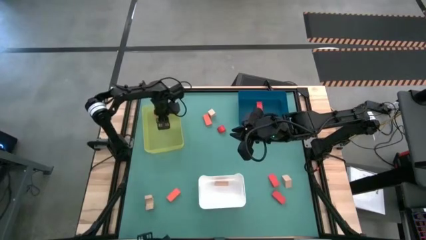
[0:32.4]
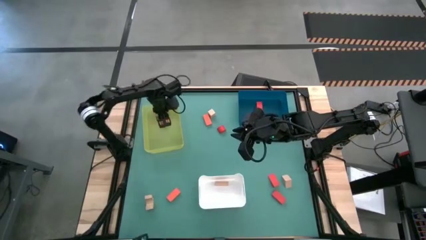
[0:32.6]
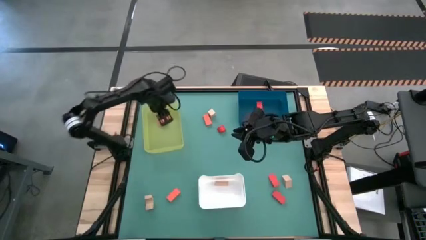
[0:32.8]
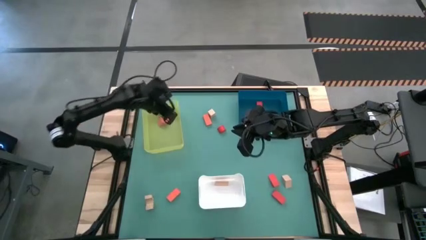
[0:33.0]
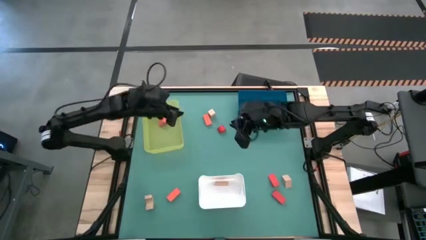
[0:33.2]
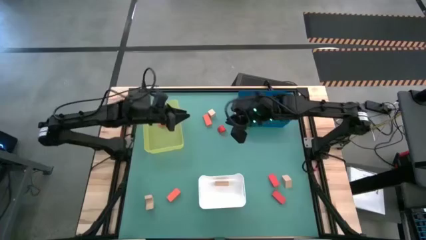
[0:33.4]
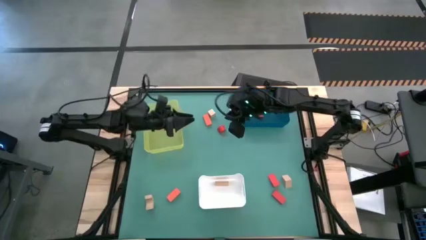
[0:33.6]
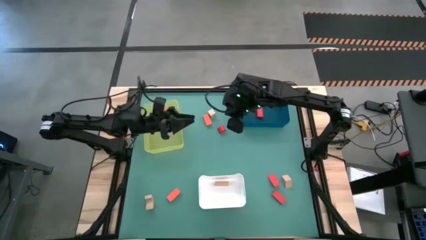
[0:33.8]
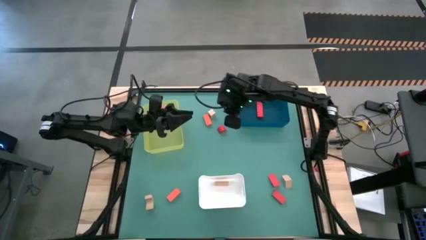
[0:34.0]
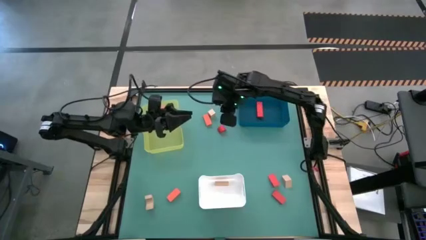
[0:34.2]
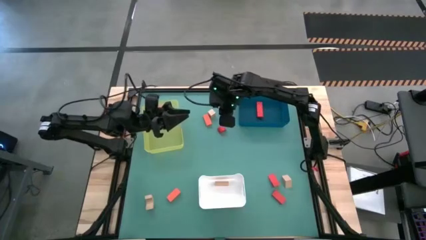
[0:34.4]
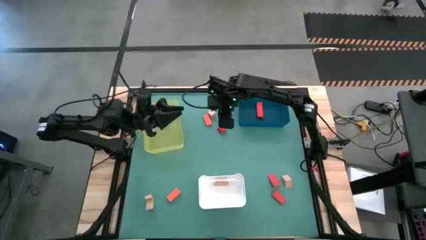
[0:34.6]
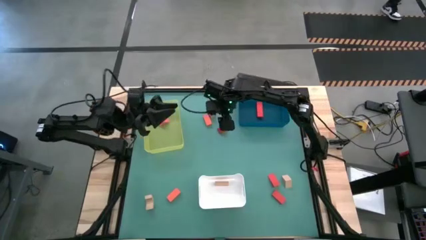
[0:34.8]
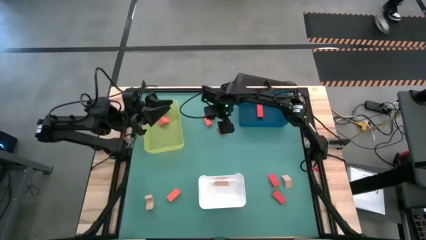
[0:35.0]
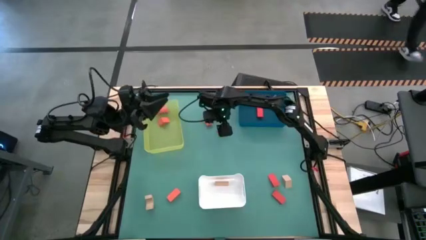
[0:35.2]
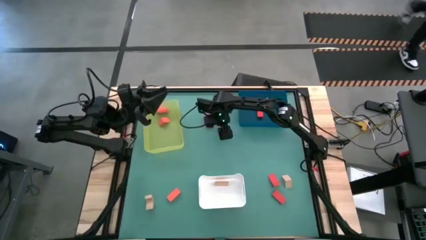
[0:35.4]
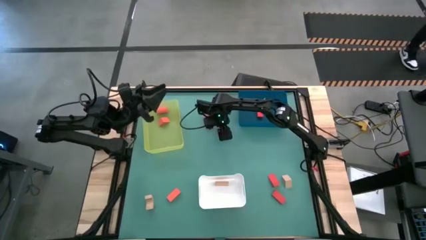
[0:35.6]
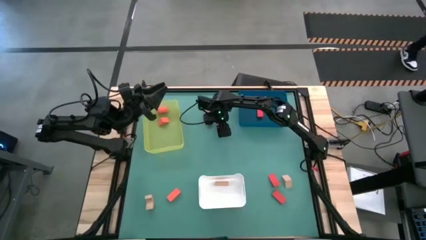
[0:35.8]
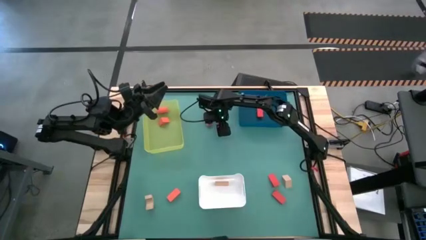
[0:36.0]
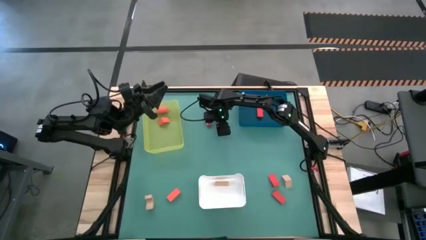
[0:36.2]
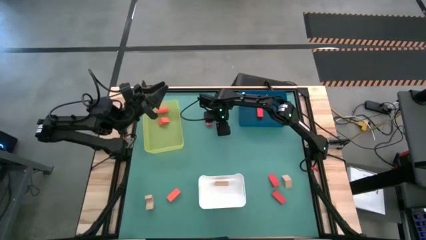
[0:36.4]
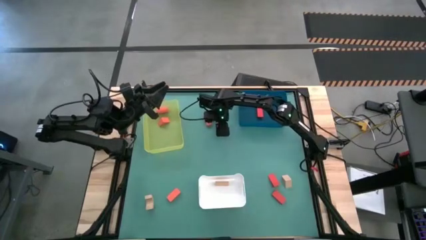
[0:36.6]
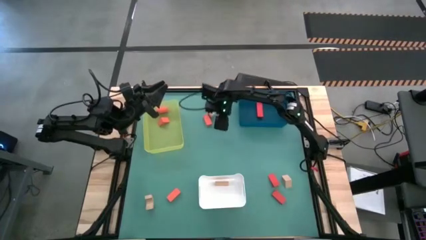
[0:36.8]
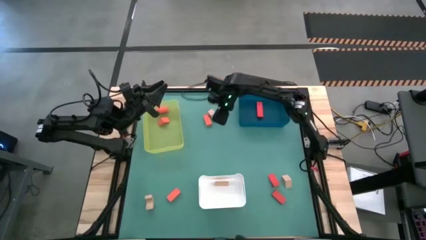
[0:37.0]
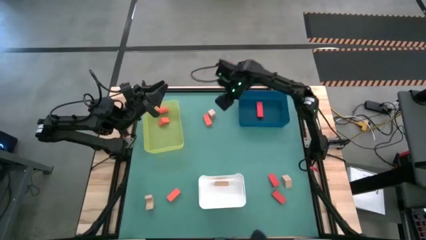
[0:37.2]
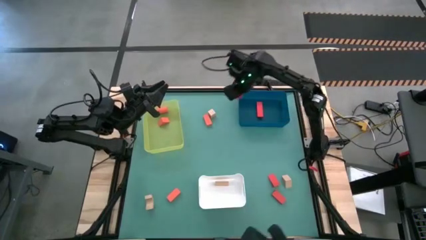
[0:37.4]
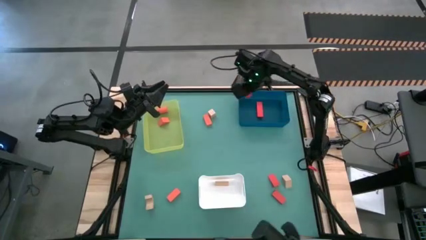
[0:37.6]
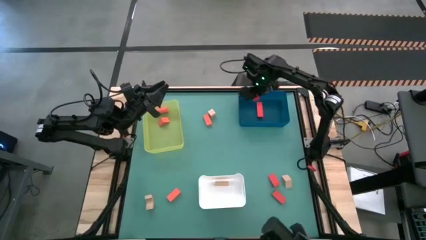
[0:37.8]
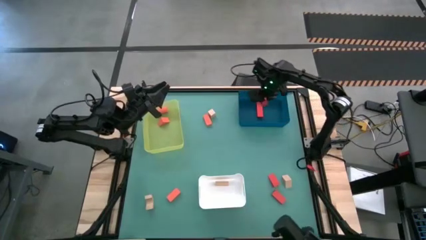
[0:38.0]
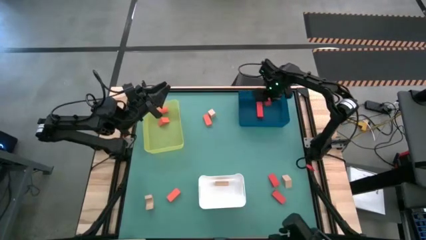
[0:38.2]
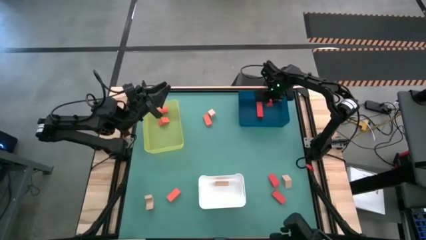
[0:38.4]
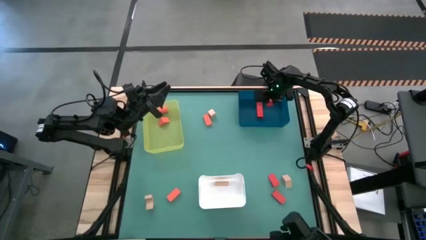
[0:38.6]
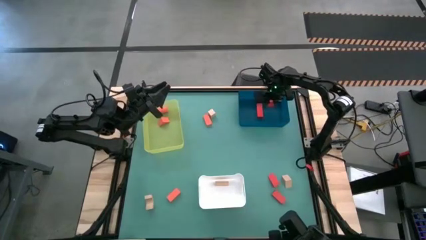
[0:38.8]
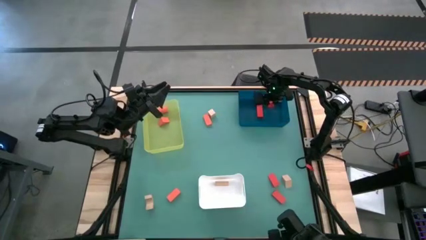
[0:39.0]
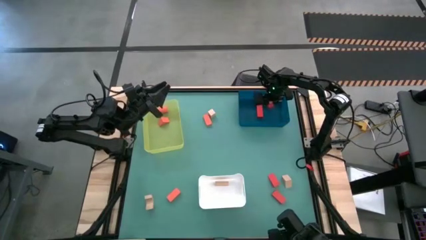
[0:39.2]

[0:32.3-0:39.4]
Task: Sort & place blocks by color
Put the red block into the blue bin

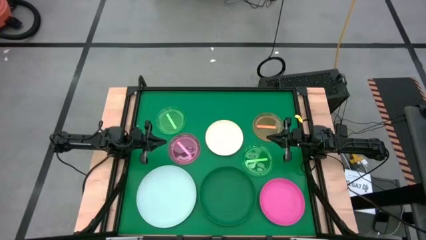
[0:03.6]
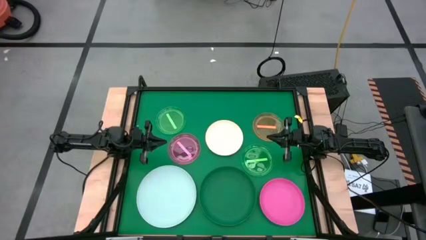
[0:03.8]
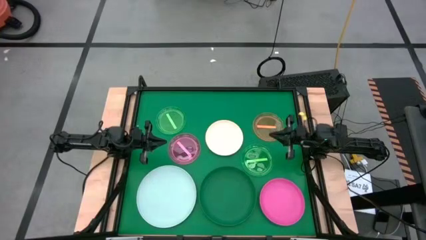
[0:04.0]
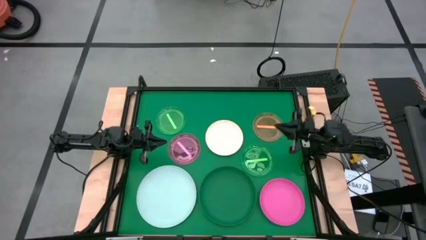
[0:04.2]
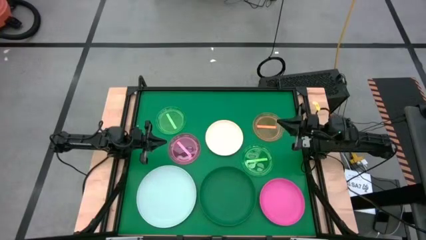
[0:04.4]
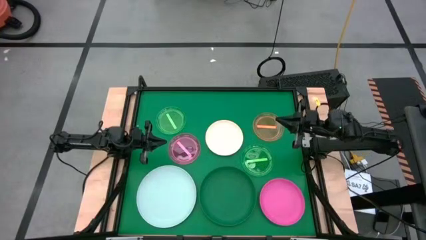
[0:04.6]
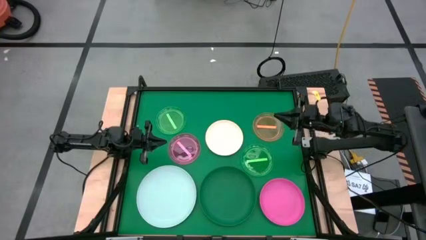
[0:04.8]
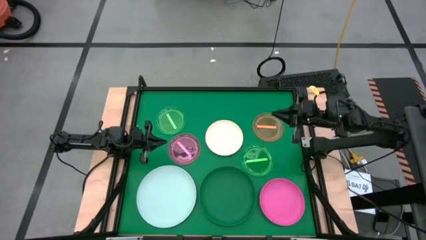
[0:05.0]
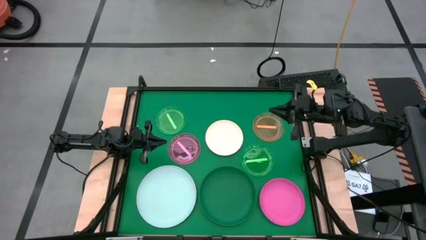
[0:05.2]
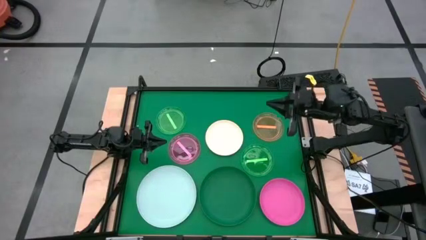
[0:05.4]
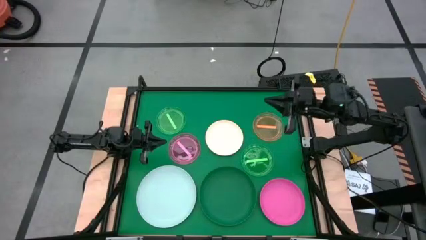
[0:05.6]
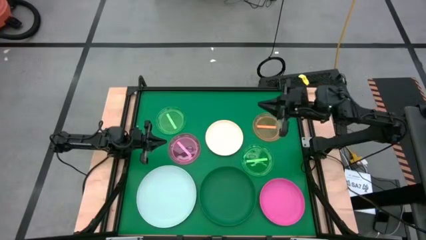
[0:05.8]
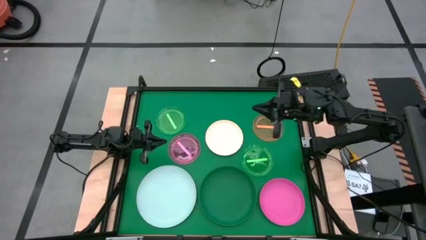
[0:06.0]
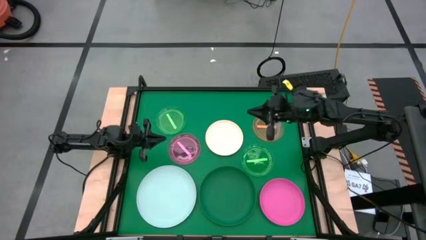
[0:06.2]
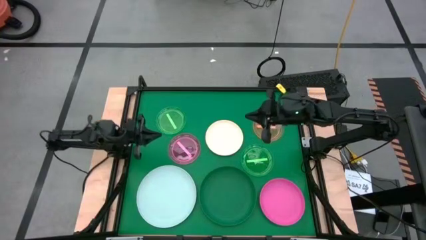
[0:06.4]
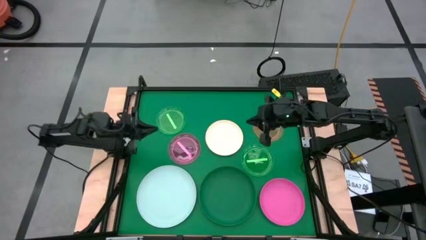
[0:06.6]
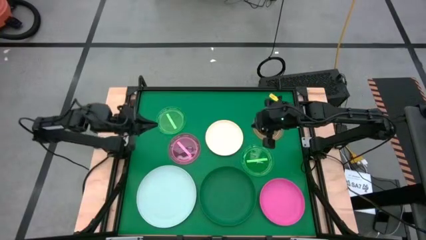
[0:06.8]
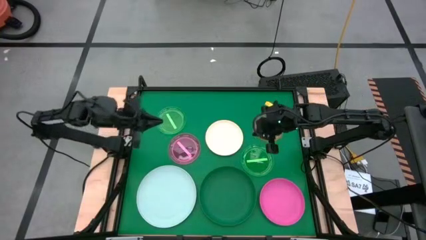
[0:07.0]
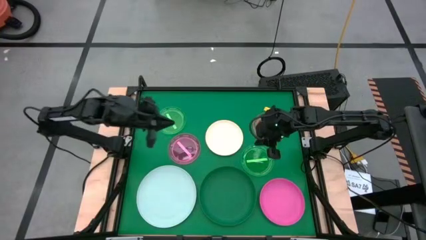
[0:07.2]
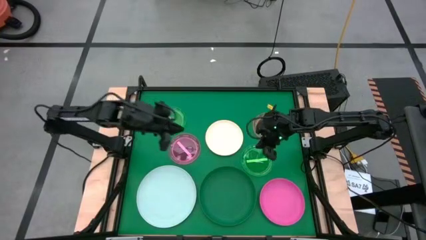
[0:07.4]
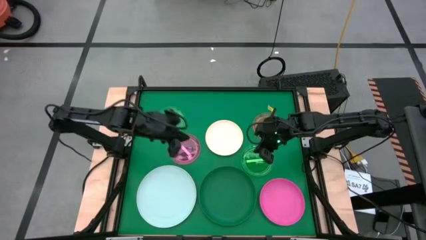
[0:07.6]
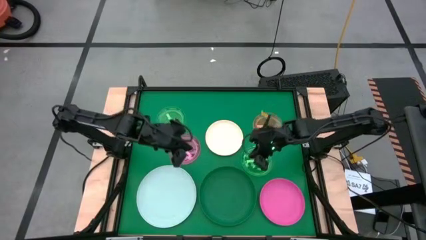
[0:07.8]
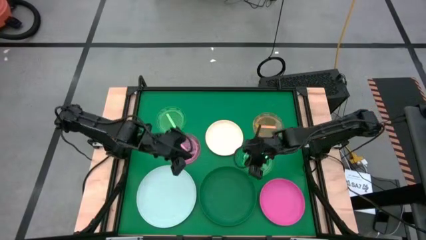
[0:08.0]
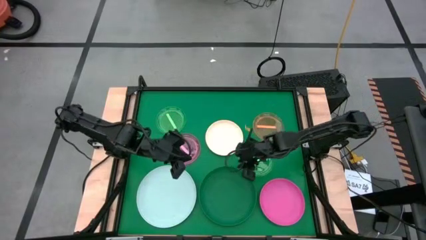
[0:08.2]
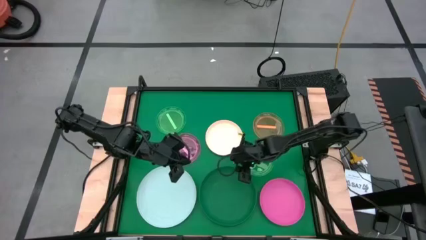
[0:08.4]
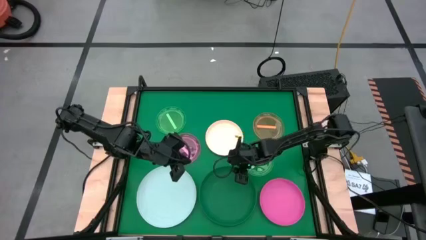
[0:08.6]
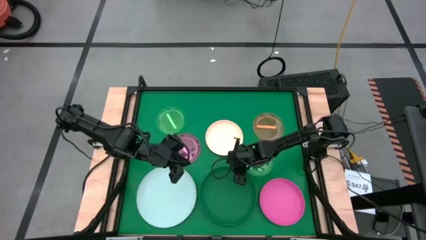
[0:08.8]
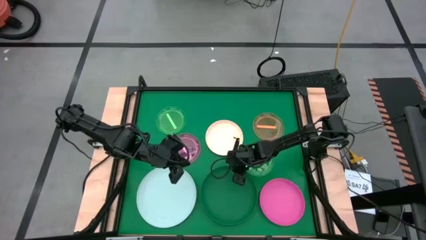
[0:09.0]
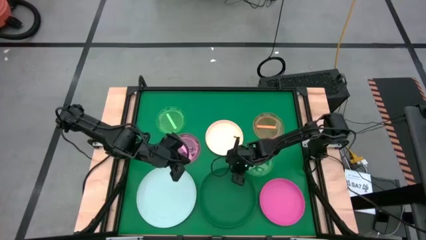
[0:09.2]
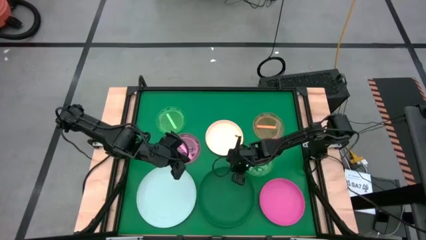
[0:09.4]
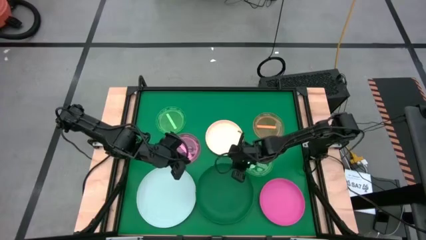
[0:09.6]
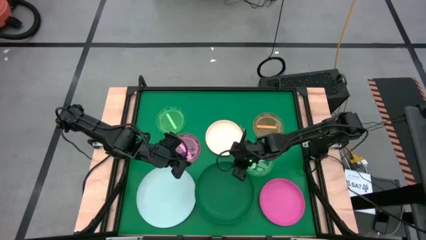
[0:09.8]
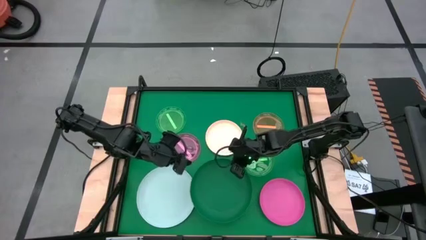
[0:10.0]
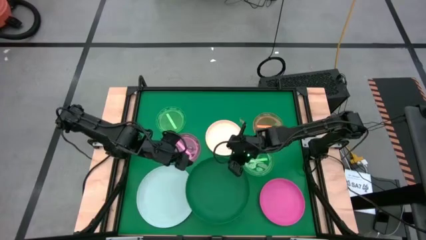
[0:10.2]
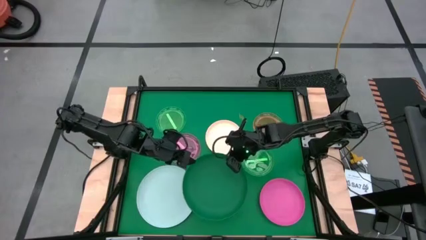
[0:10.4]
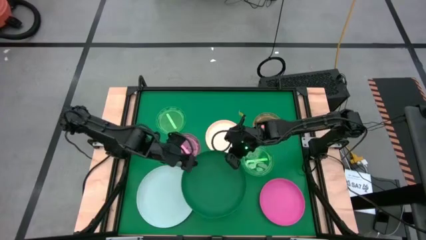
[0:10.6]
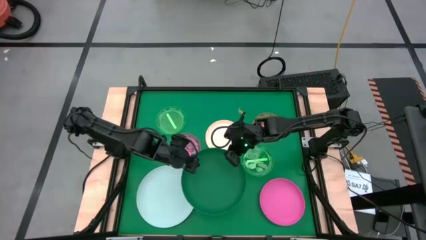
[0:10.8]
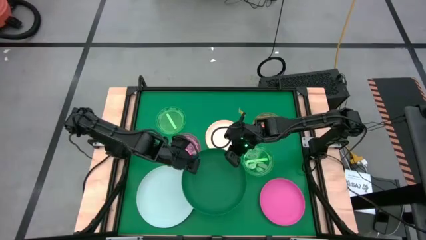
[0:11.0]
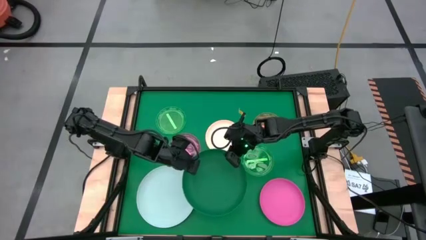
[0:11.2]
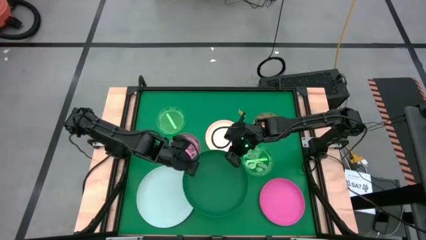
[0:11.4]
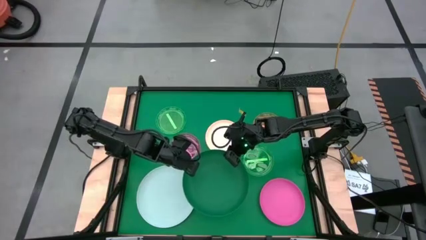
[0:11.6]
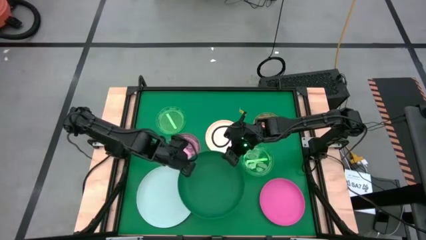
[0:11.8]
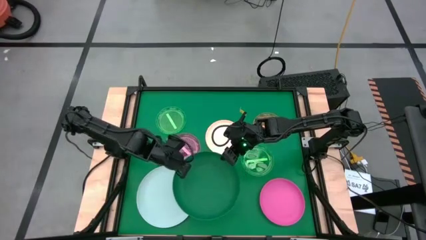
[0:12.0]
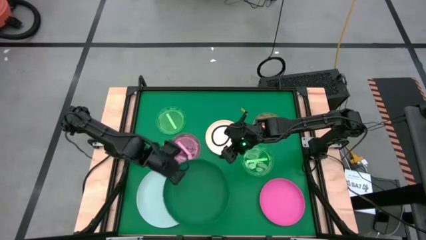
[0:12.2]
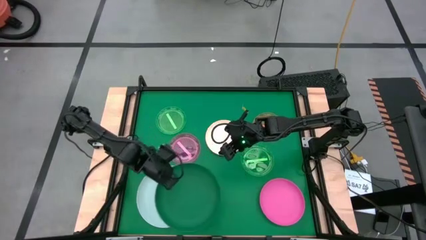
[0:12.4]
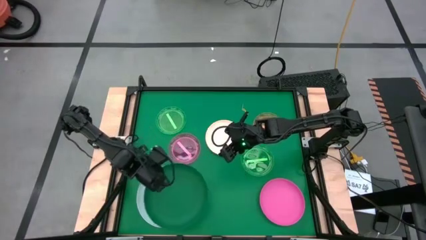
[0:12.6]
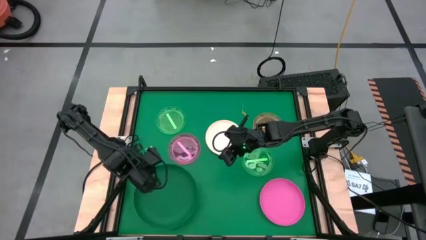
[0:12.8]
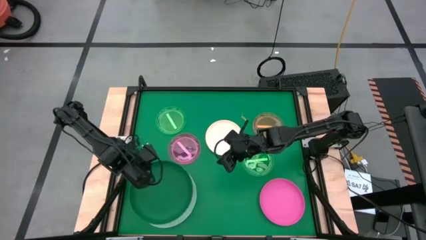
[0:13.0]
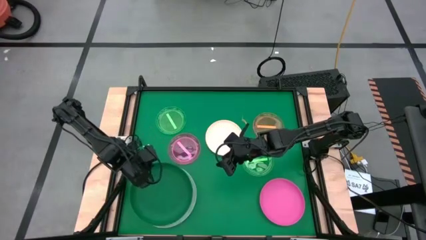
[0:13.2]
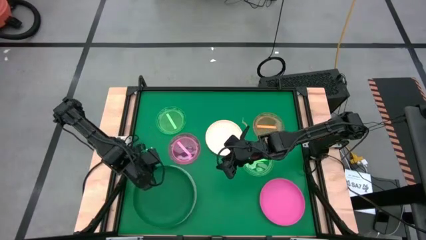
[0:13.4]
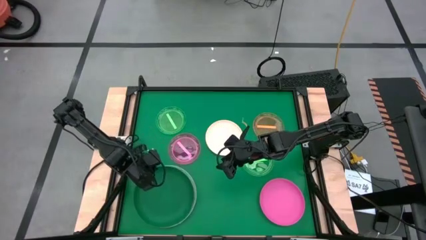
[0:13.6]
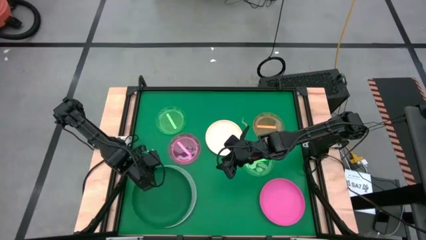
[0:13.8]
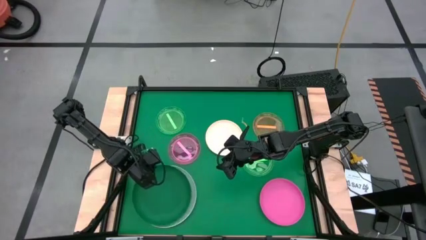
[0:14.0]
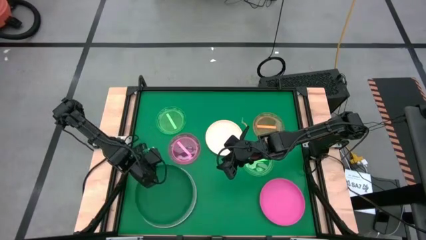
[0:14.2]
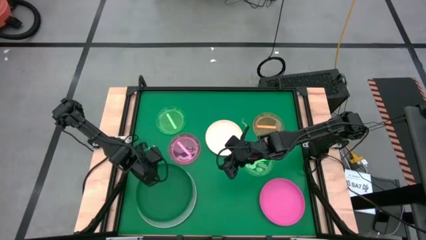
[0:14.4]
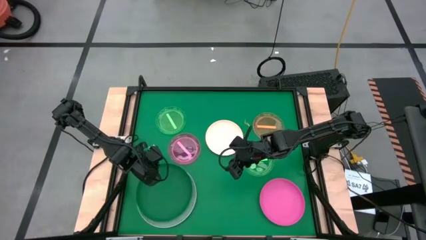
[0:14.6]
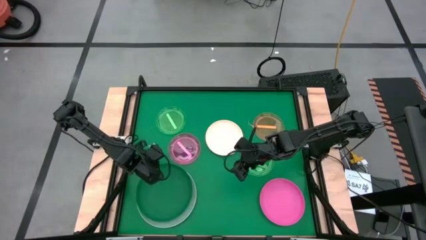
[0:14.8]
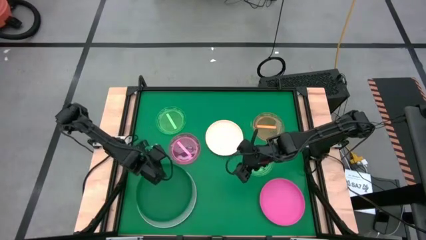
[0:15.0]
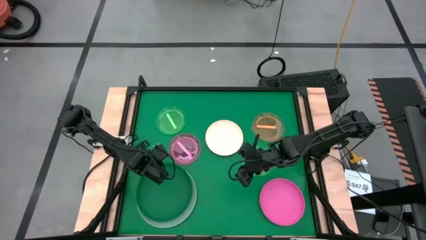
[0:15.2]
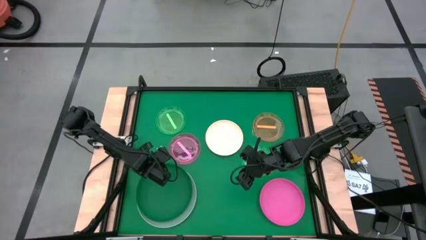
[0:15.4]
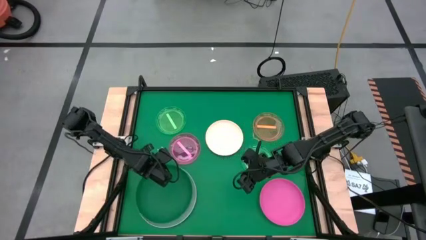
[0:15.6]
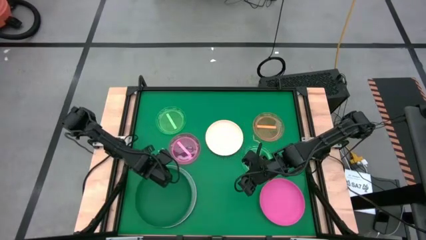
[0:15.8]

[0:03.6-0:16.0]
Task: Stack plastic plates
Stack the large green plate on top of the large white plate
